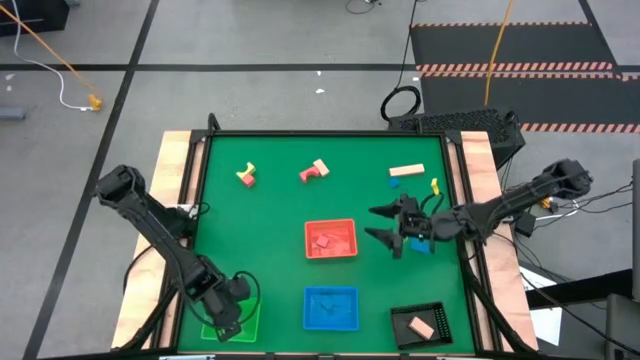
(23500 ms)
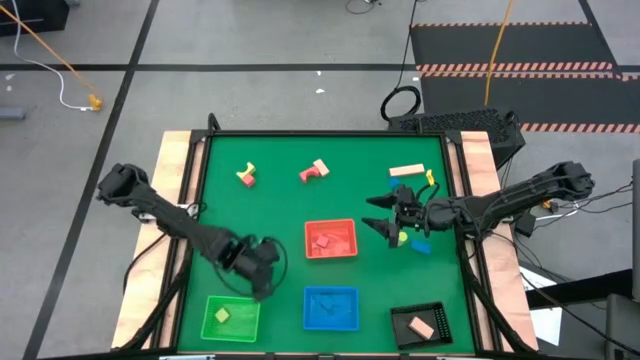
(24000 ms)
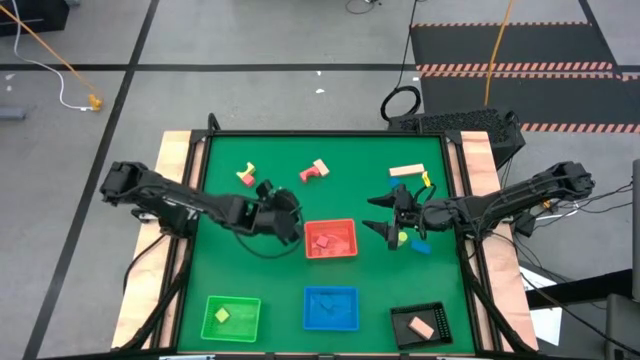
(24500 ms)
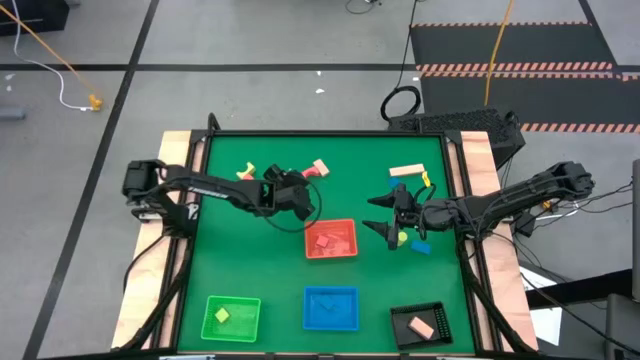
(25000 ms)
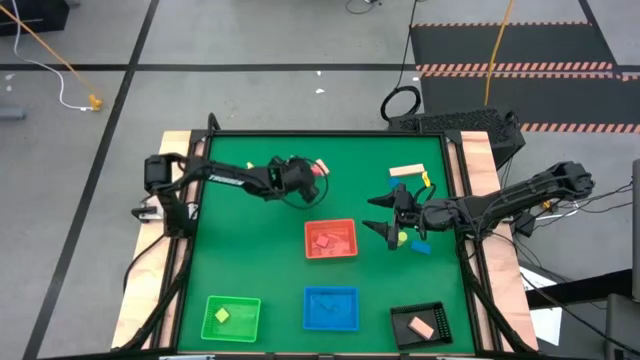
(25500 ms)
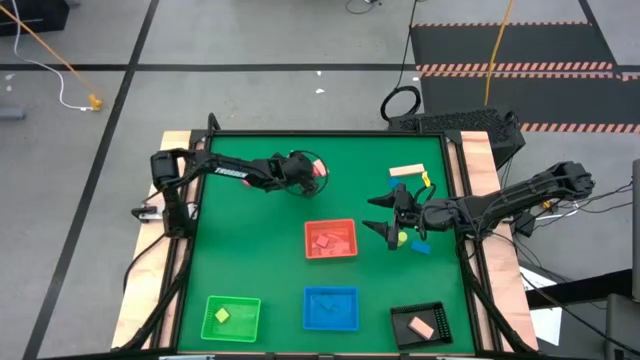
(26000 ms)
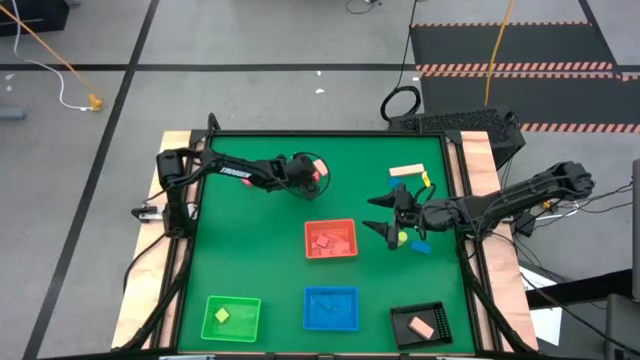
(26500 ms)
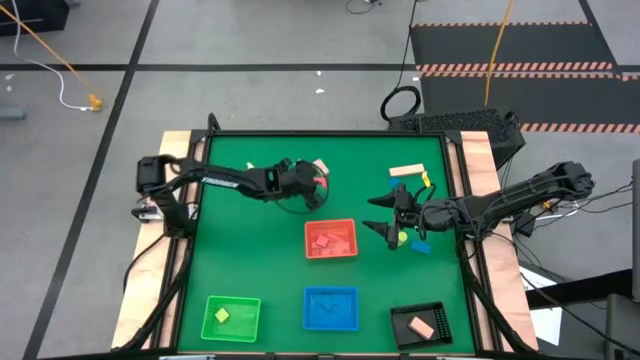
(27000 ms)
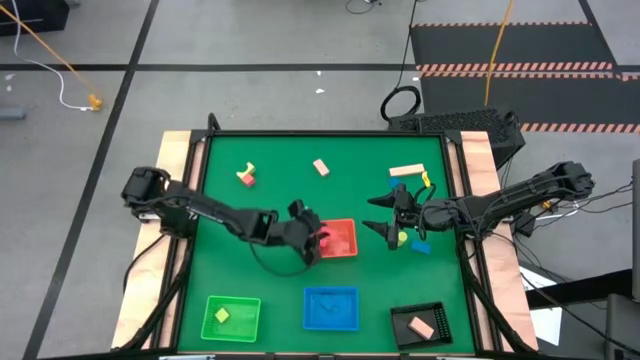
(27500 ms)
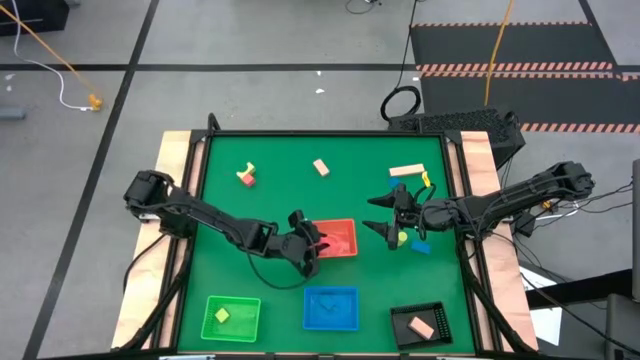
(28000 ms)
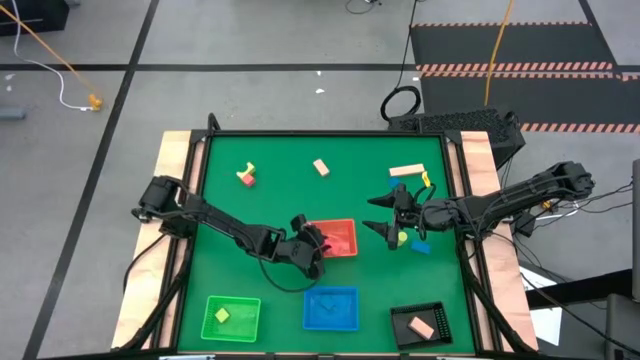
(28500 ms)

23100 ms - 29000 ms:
Task: Sort & place blocks by color
Put the right orange block into the orange bin

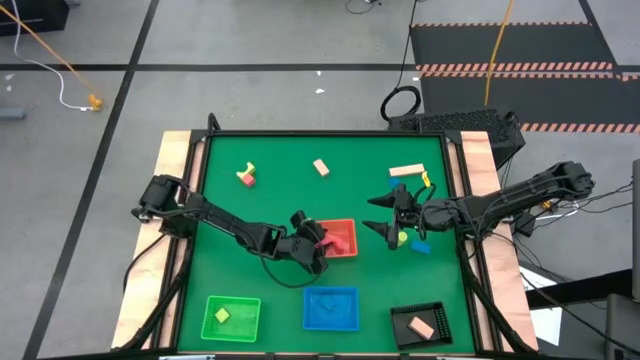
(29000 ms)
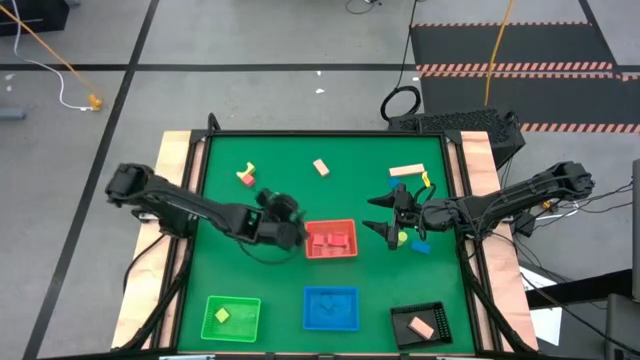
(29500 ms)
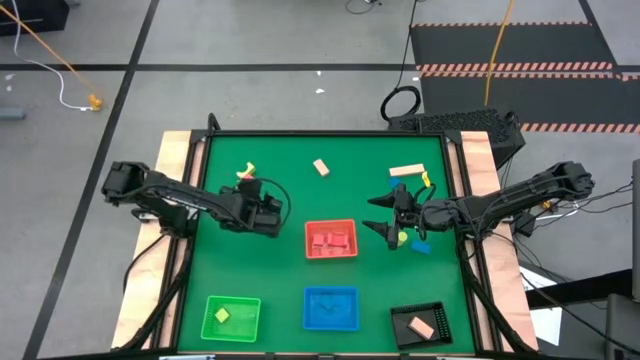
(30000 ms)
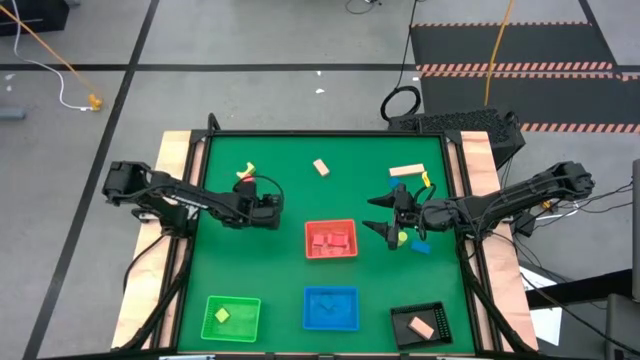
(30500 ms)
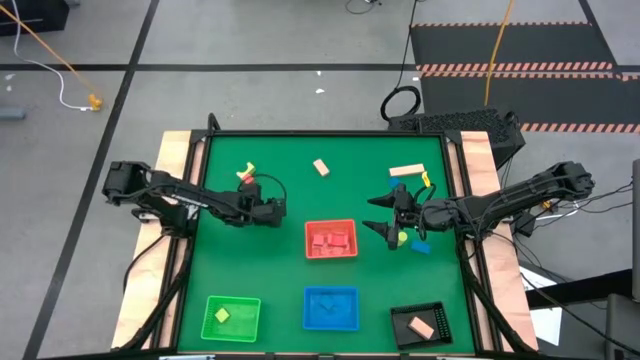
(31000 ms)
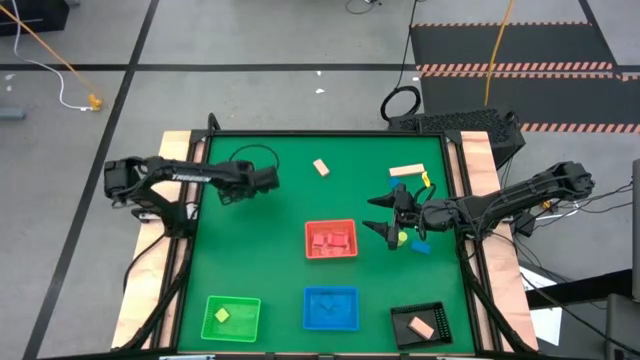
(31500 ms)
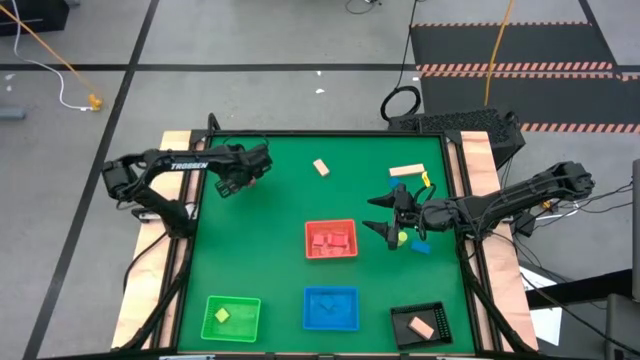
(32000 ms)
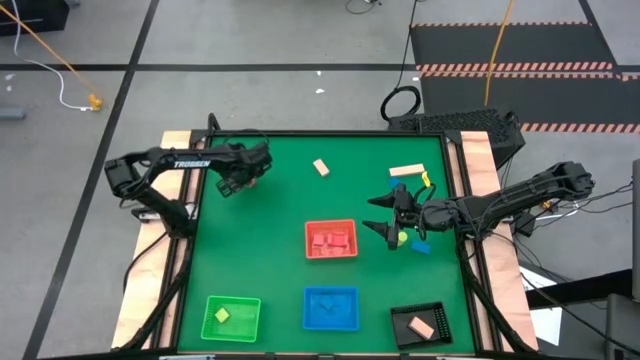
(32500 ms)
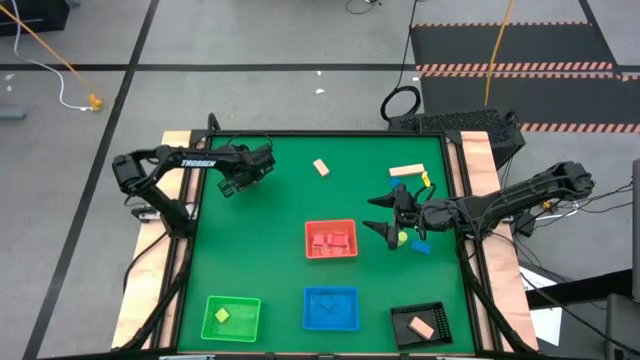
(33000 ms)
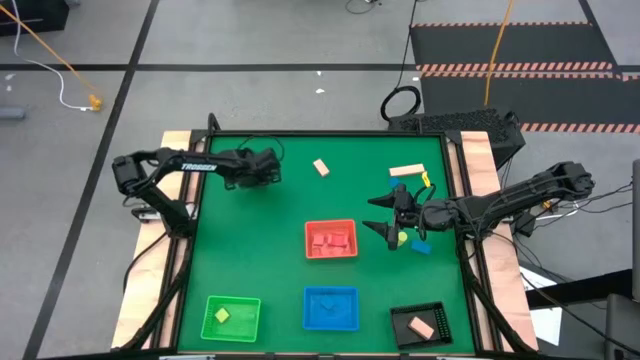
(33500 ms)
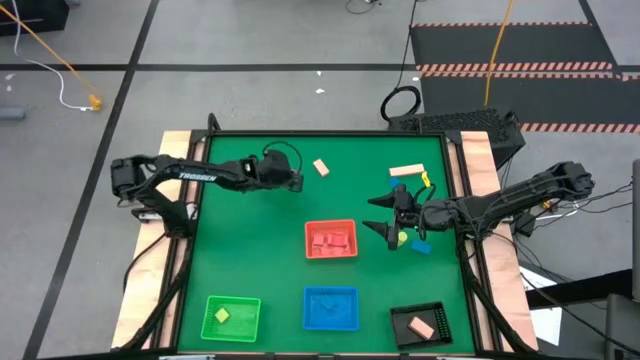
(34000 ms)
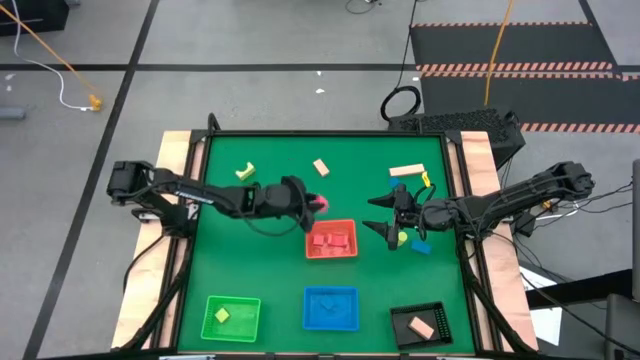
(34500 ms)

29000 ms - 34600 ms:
Put the orange block into the orange bin

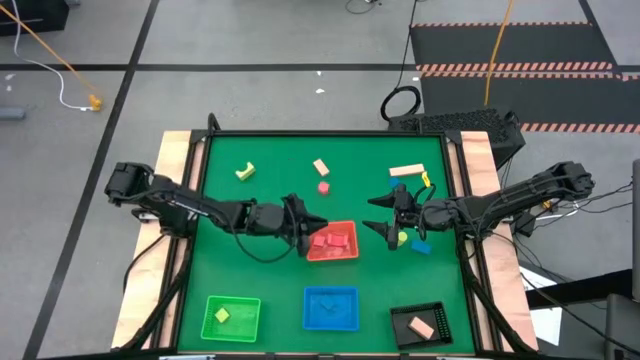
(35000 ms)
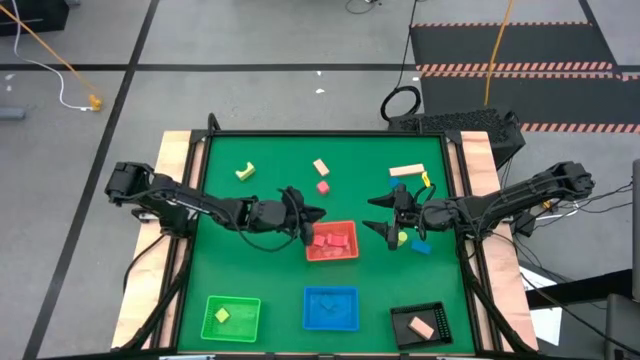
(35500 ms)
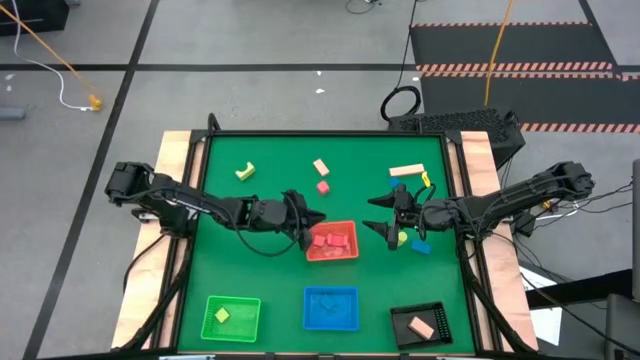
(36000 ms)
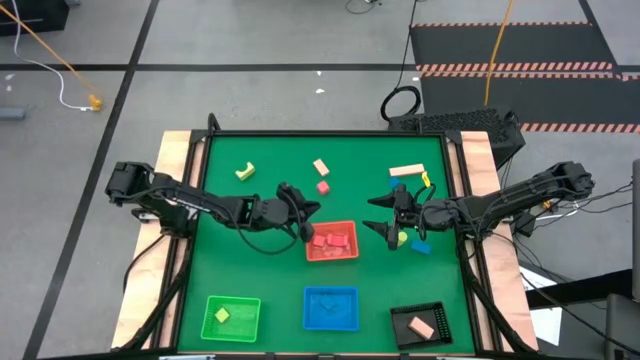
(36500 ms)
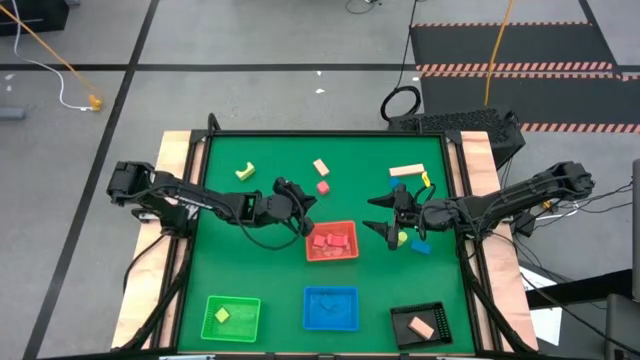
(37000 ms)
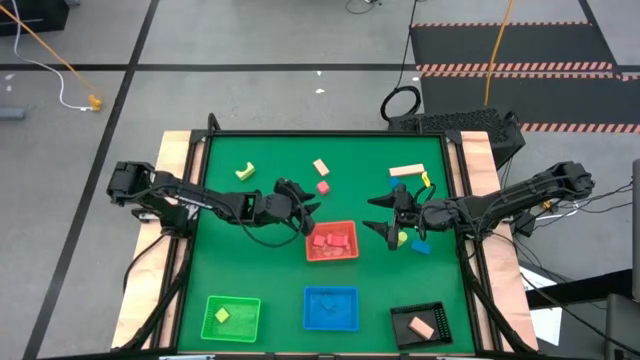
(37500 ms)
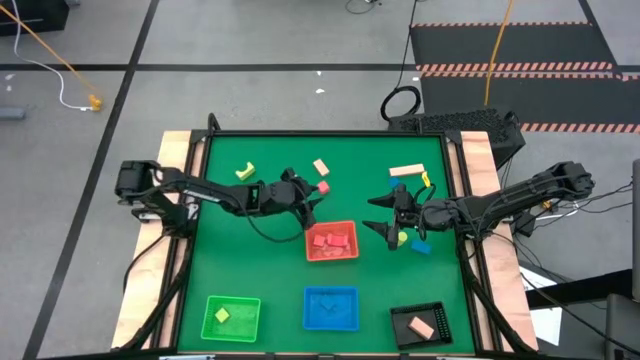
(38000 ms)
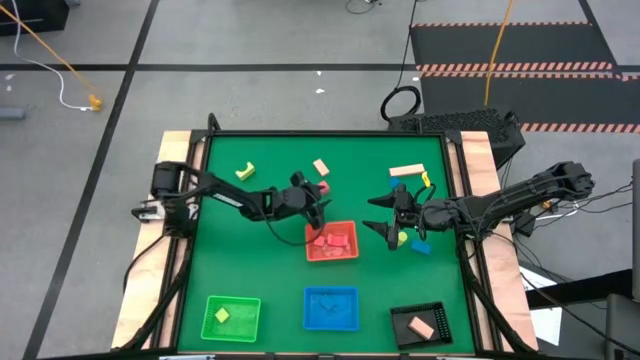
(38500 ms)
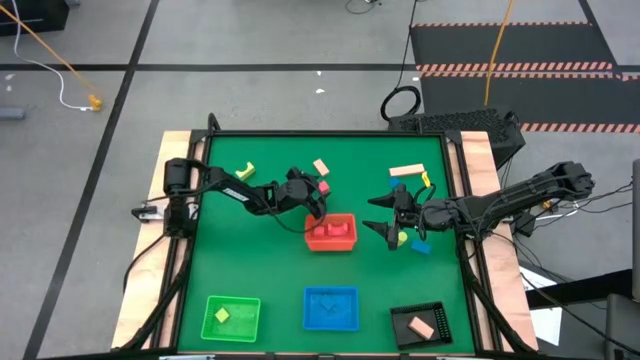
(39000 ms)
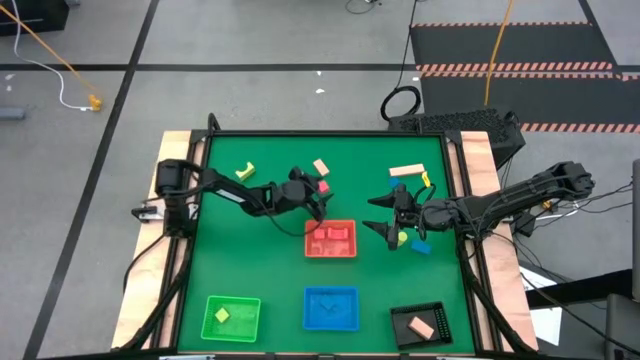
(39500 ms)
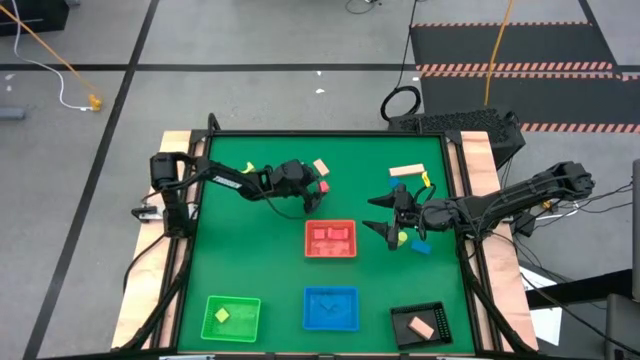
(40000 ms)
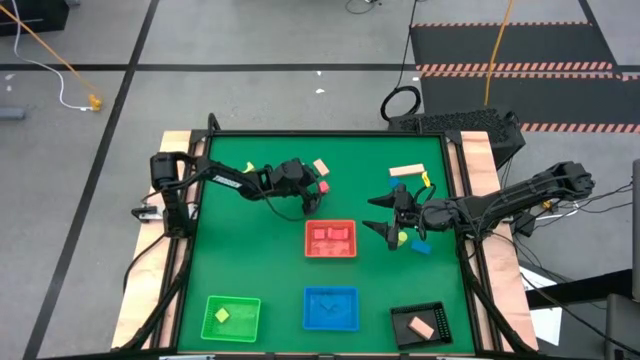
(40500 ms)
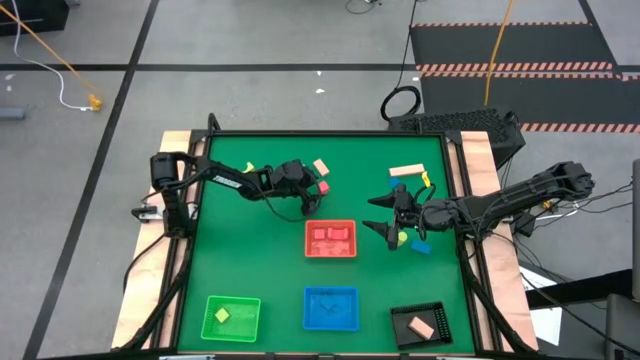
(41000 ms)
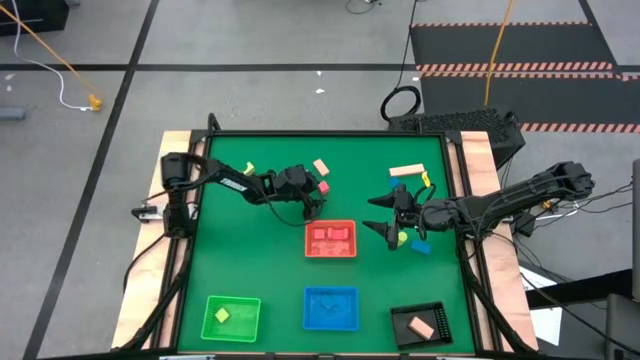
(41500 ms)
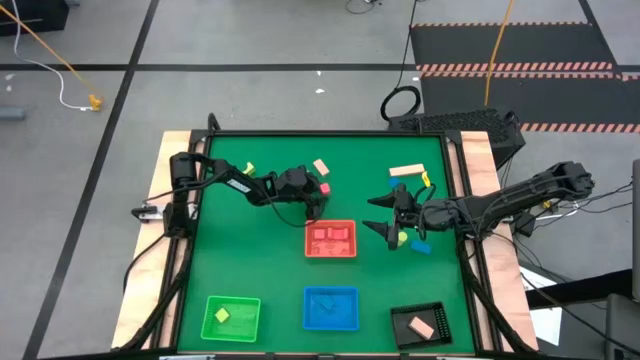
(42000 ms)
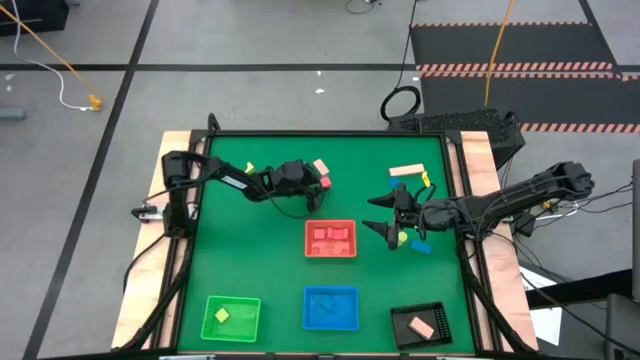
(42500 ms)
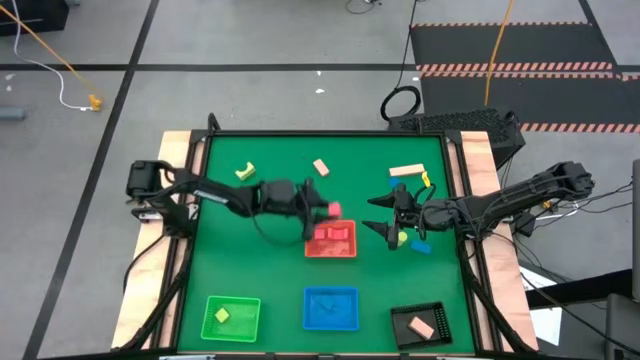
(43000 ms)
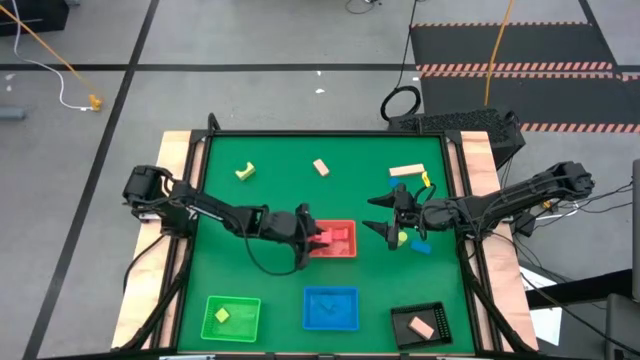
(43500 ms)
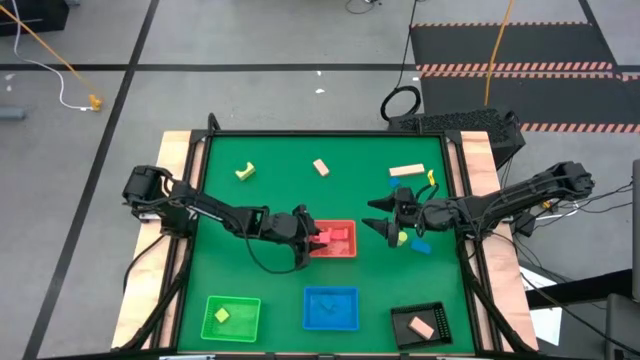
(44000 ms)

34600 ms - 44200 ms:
Put the orange block into the orange bin

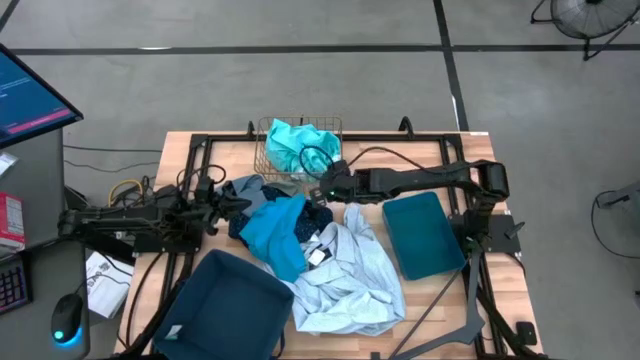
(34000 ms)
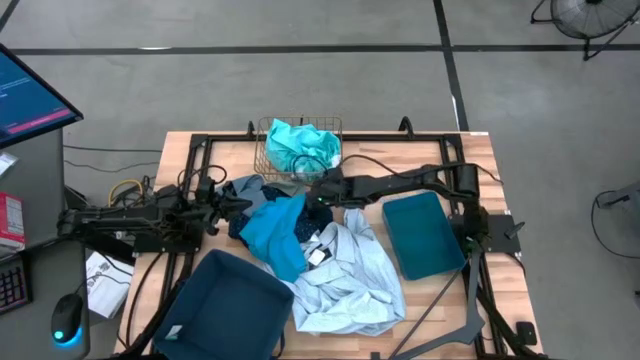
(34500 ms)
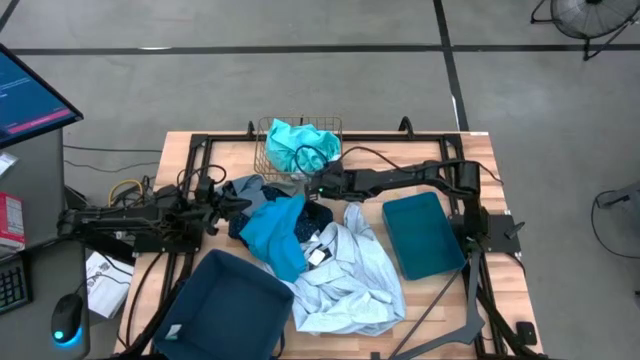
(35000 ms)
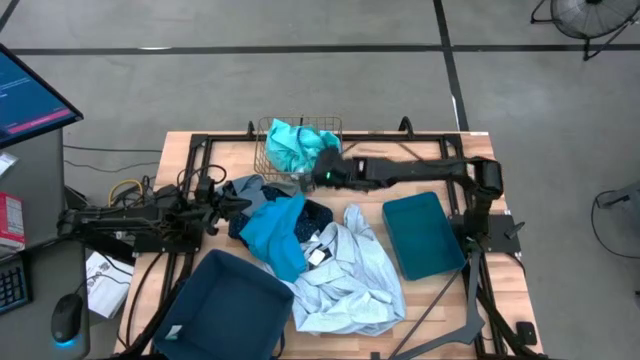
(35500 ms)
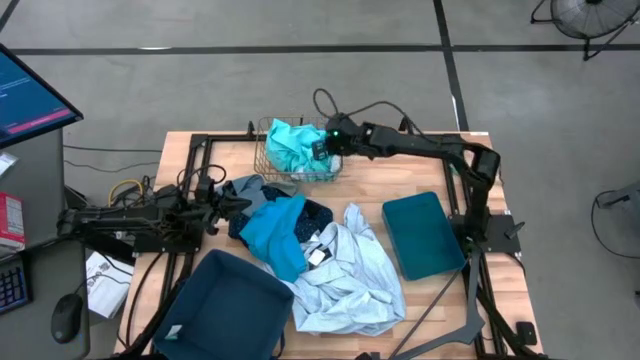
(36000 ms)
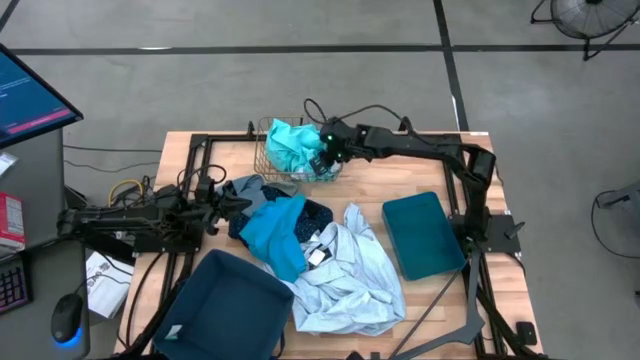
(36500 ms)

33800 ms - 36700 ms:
Task: Pick & Place Cloths
Put the light blue shorts into the gold wire basket
